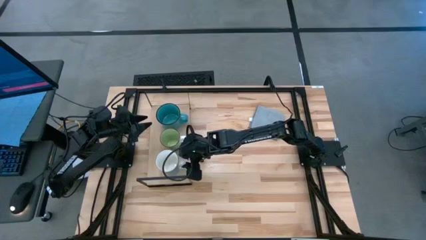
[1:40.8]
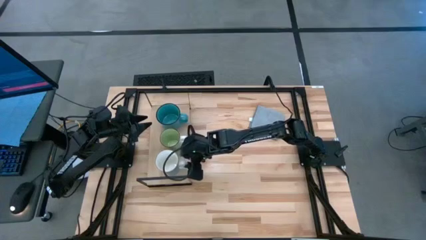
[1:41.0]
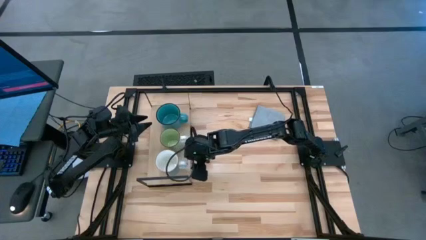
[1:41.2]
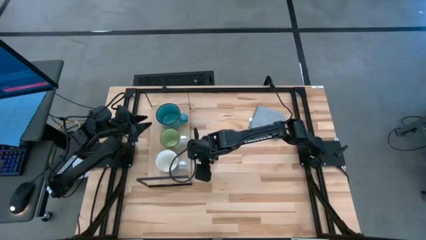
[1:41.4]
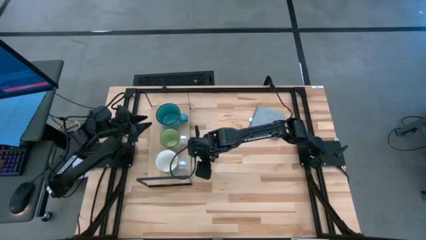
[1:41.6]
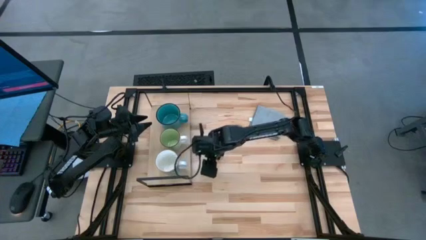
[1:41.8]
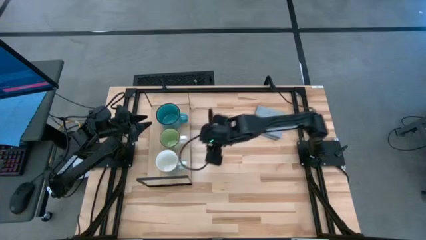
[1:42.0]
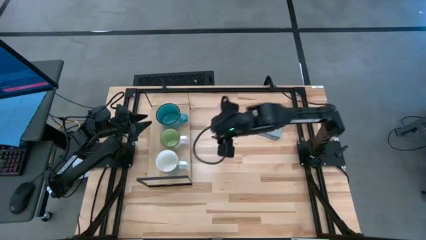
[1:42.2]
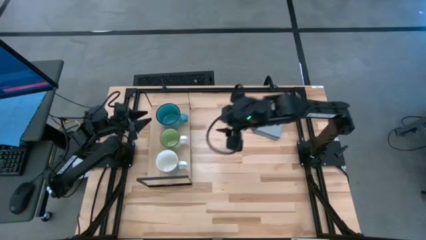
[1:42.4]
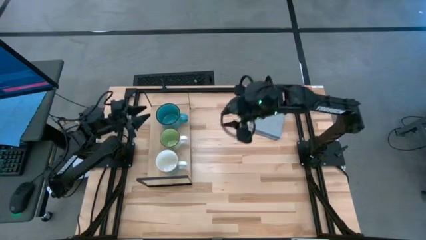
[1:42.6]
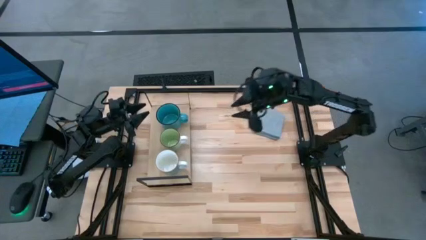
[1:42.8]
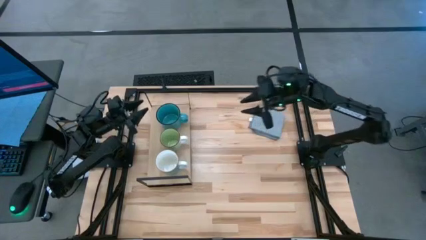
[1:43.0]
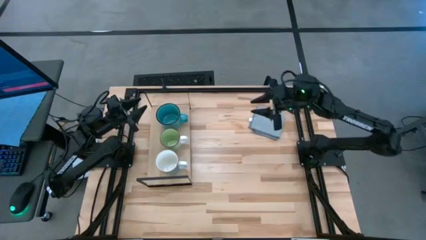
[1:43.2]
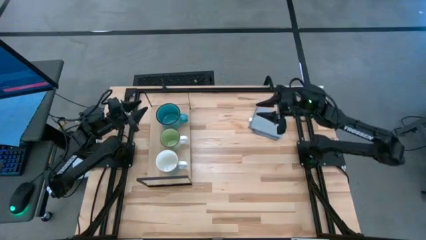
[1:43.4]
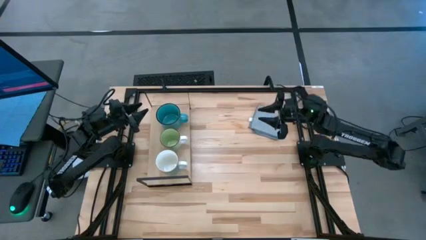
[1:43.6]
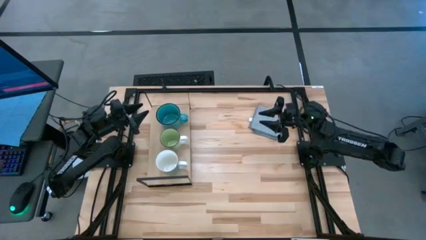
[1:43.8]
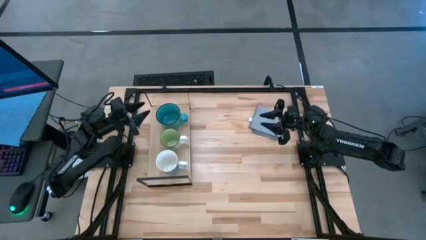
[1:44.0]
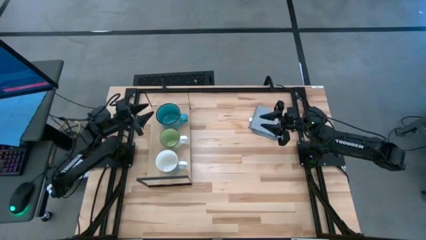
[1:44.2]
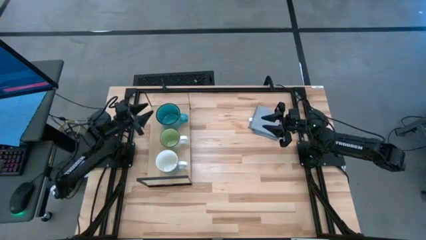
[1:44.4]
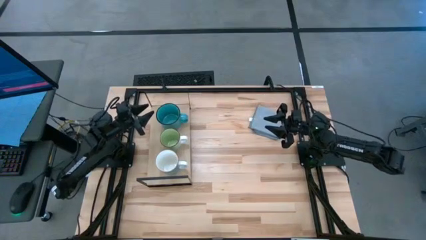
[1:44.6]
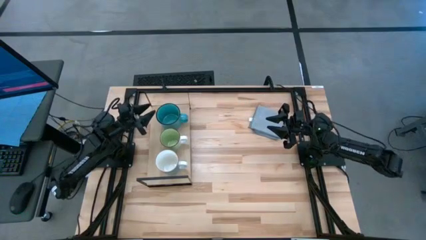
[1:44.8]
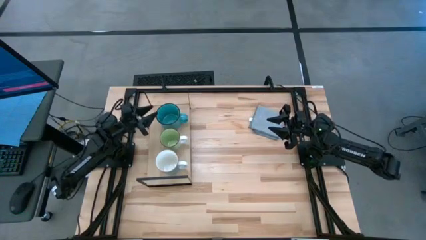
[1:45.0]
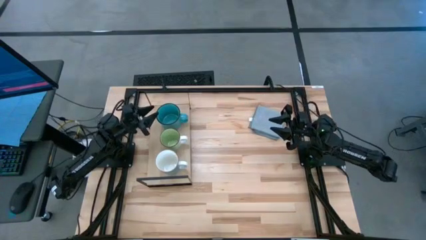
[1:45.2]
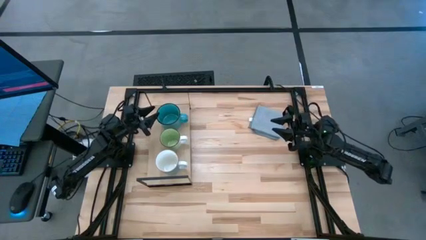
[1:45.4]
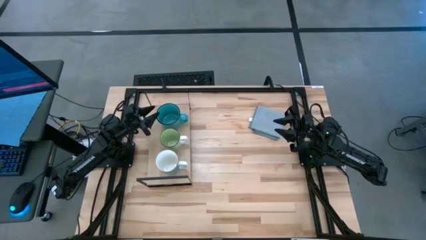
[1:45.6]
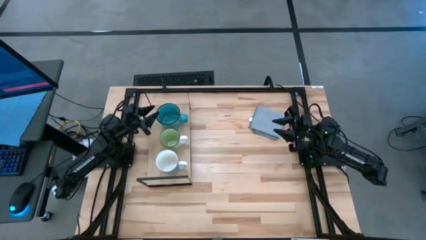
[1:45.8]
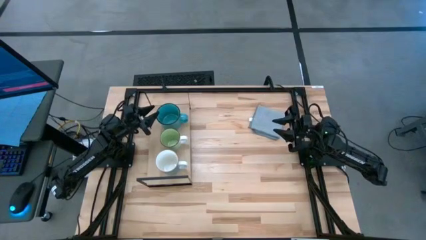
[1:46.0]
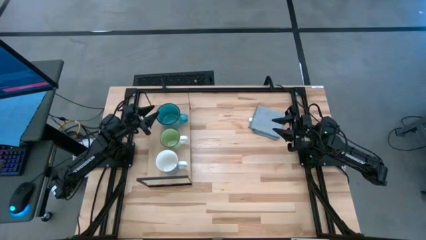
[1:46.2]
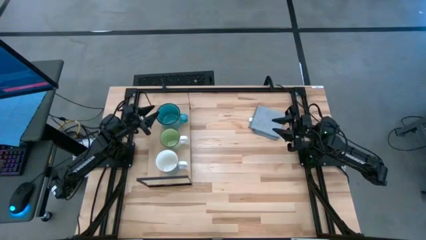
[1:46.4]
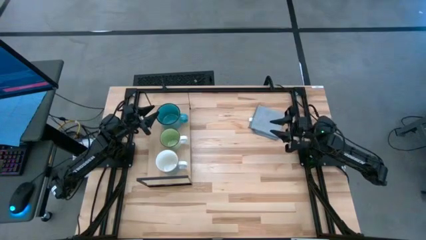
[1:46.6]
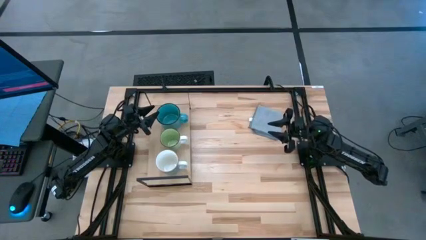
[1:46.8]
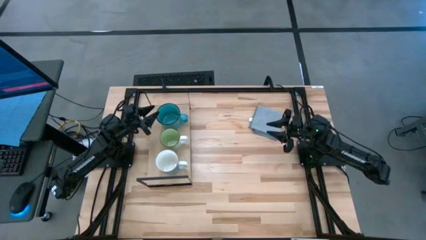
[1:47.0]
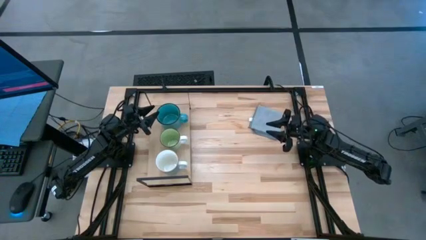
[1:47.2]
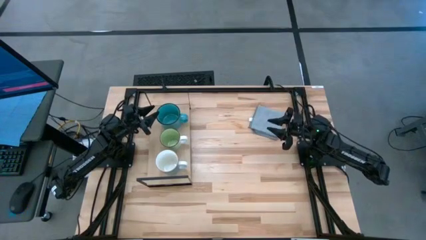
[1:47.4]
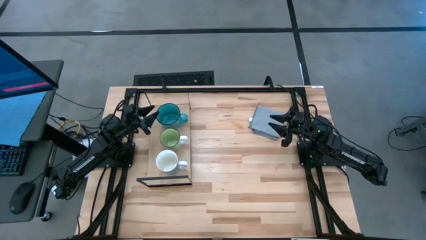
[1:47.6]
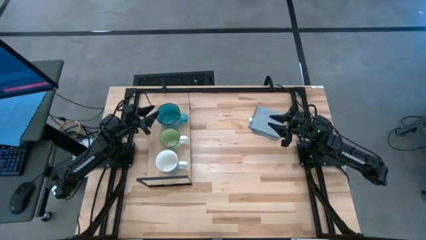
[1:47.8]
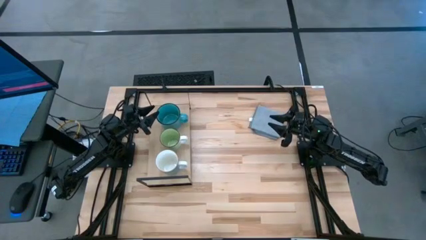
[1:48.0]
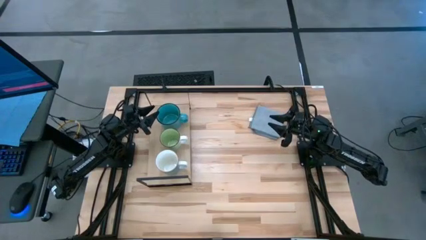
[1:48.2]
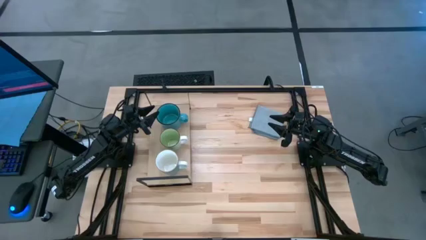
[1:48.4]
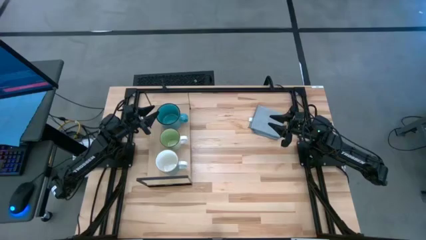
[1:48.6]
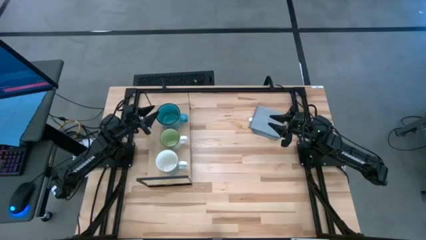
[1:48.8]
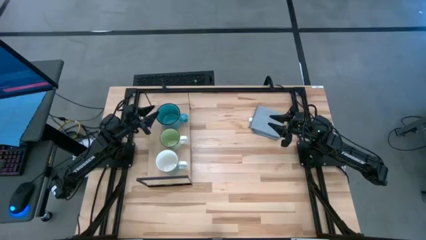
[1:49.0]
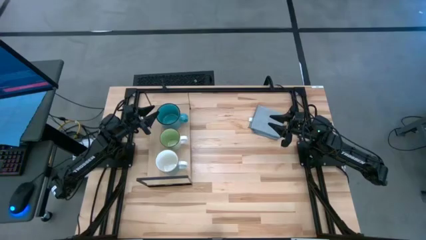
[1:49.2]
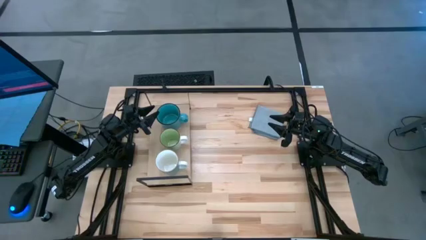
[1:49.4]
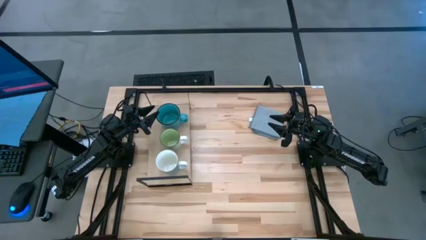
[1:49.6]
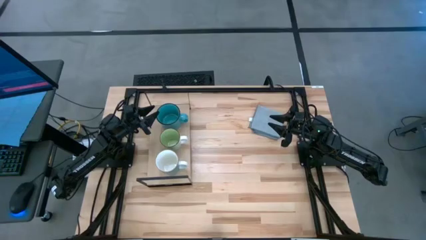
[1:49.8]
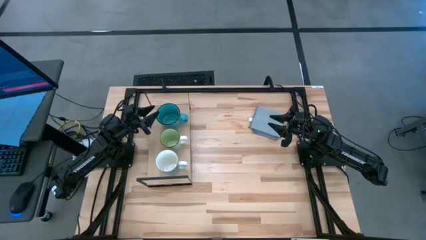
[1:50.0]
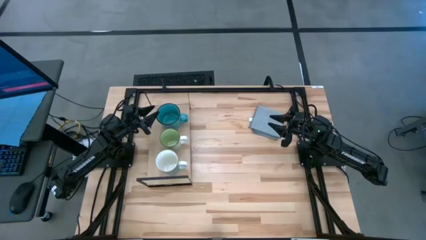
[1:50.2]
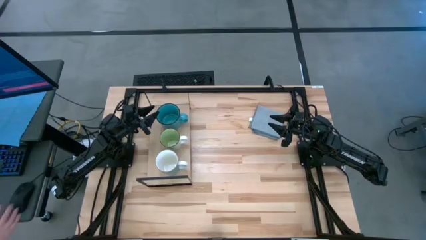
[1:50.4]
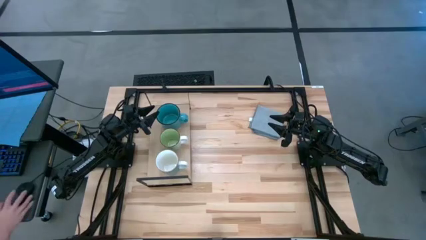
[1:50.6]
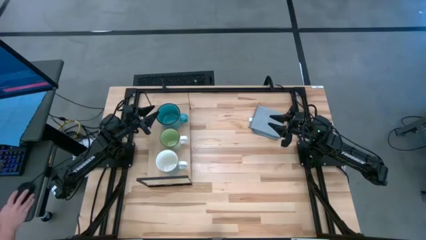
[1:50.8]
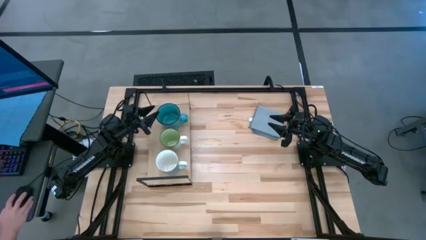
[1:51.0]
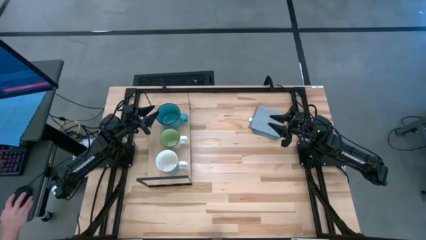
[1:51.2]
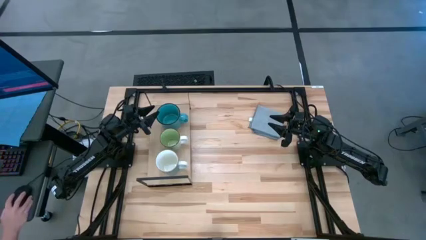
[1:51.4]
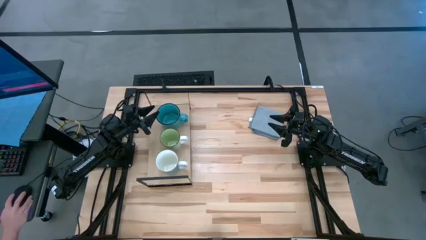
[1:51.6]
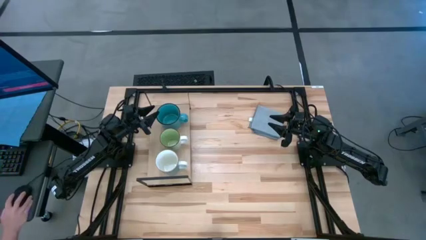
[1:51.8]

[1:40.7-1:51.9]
Task: Stack small to large cups/mugs on shelf
Return to Home Position

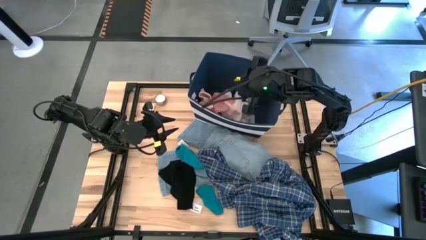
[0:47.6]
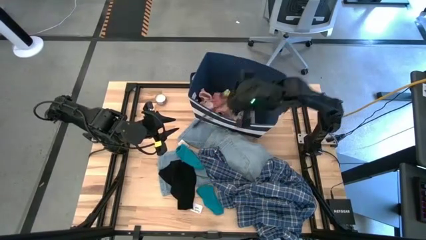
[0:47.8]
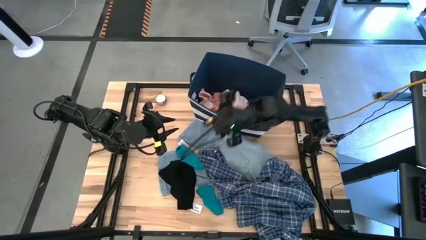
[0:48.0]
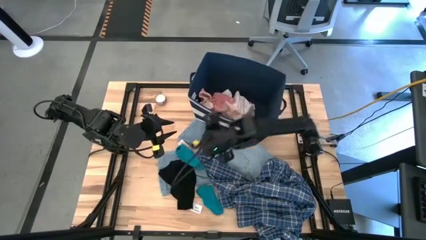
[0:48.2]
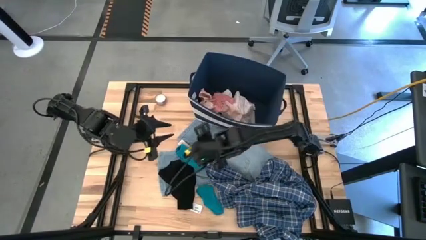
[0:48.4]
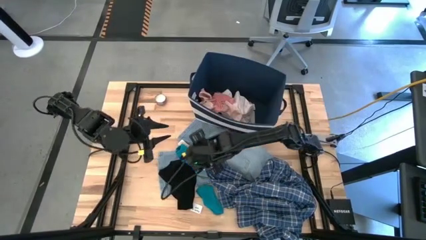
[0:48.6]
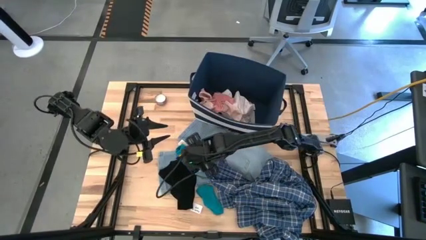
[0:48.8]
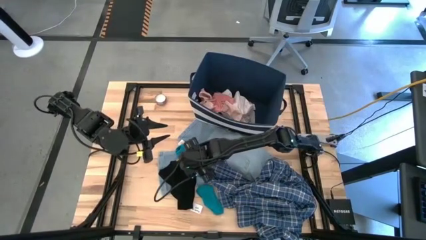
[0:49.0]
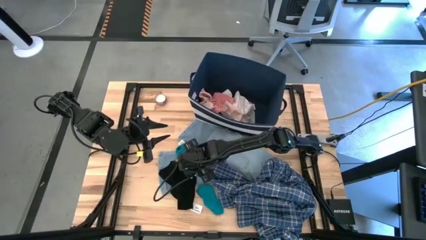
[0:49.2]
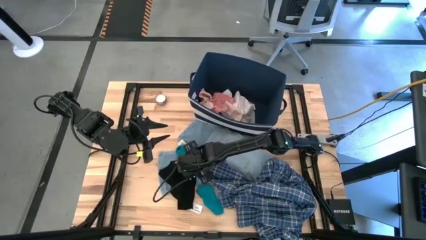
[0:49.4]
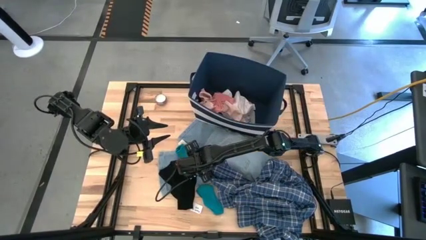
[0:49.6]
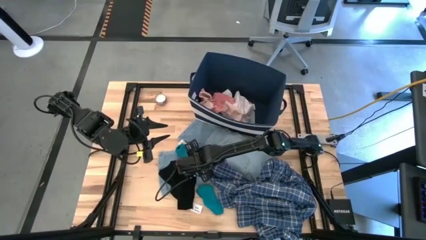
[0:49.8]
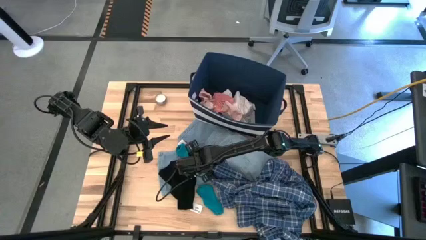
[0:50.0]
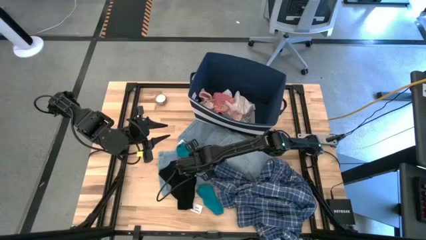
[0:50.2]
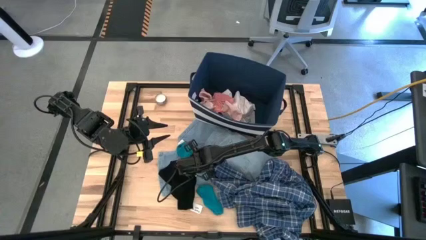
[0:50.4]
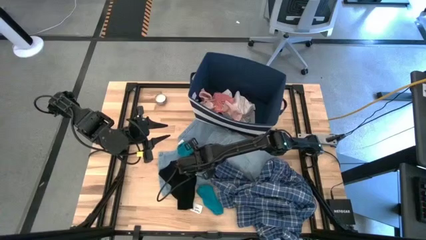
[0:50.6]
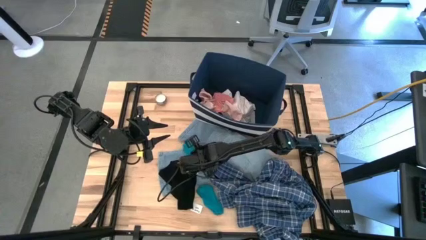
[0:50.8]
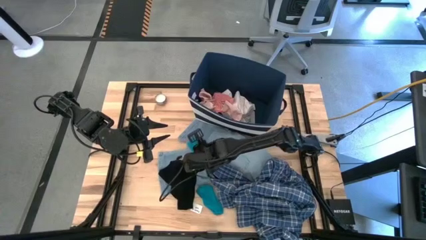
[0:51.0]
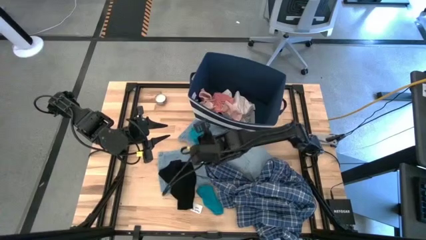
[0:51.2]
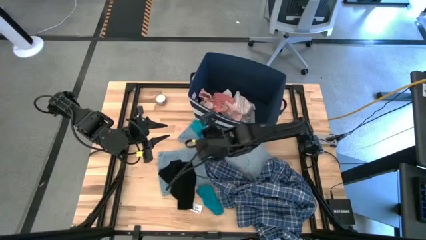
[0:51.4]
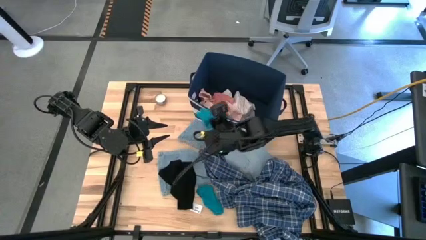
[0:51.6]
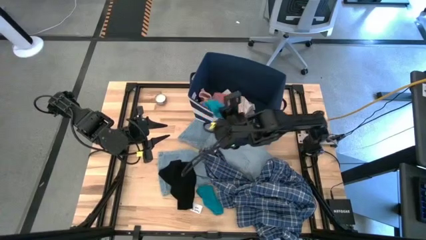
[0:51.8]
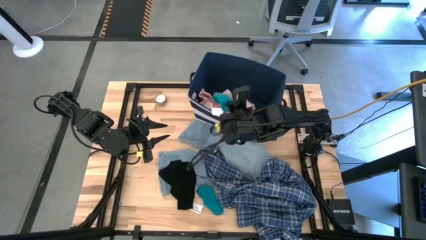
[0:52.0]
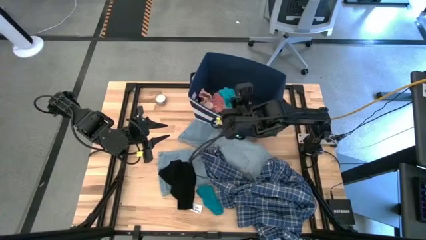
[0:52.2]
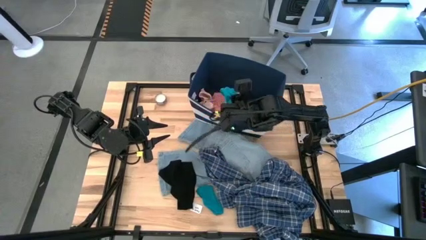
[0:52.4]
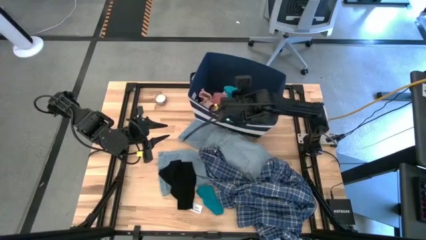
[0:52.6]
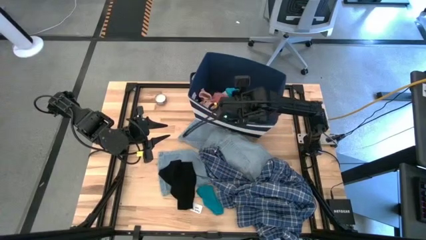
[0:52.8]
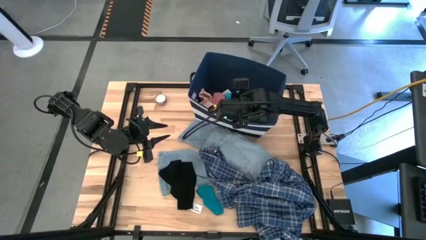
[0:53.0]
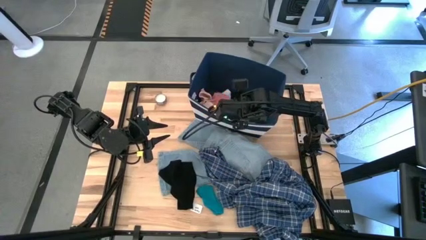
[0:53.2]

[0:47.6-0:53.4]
Task: Sort clothes
Put the top blue sock into the blue laundry organizer
